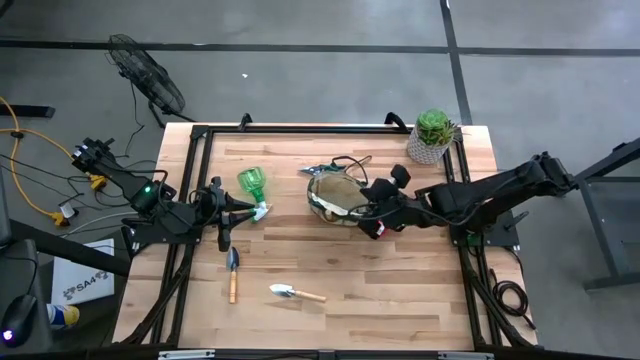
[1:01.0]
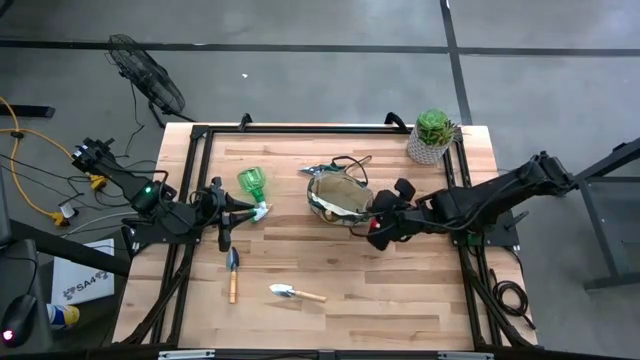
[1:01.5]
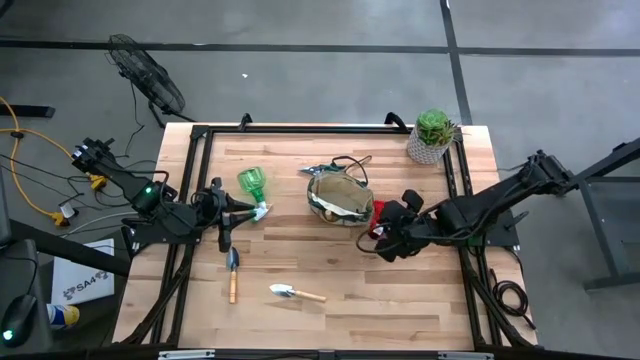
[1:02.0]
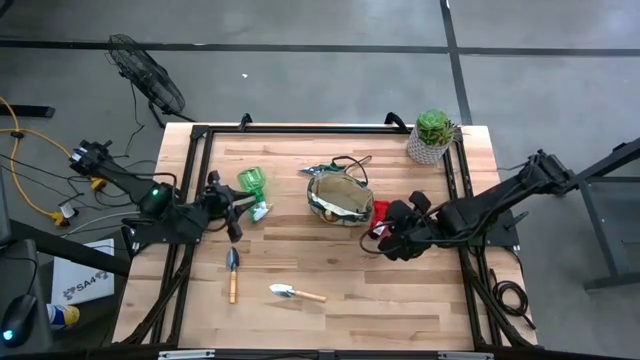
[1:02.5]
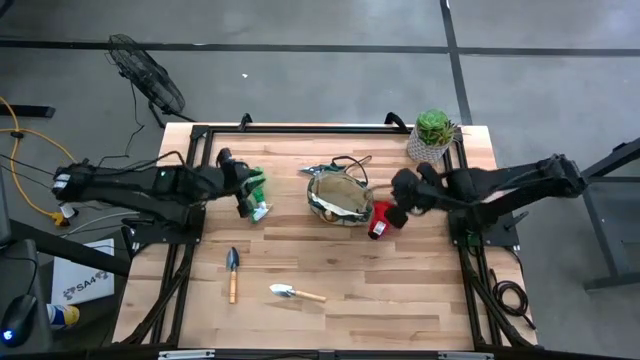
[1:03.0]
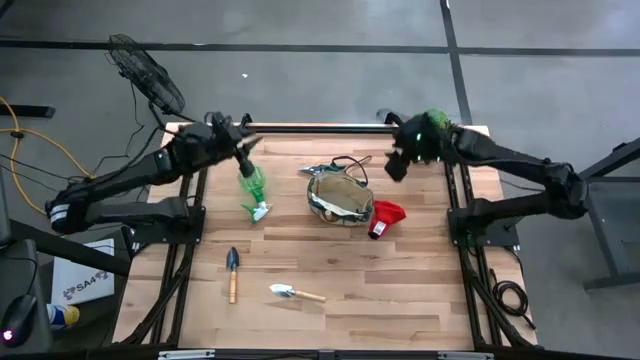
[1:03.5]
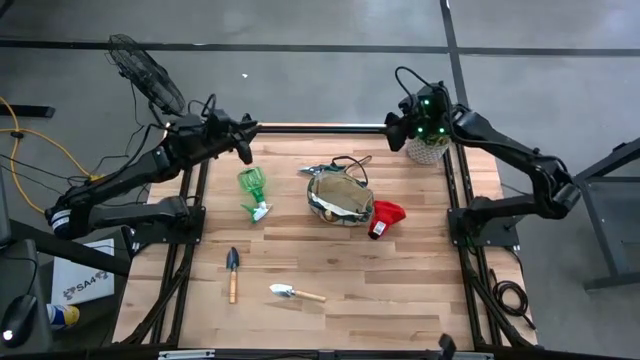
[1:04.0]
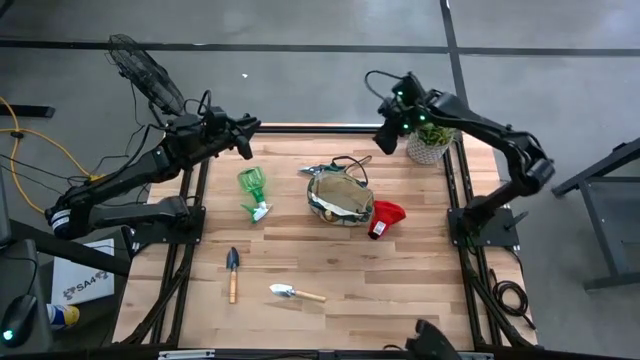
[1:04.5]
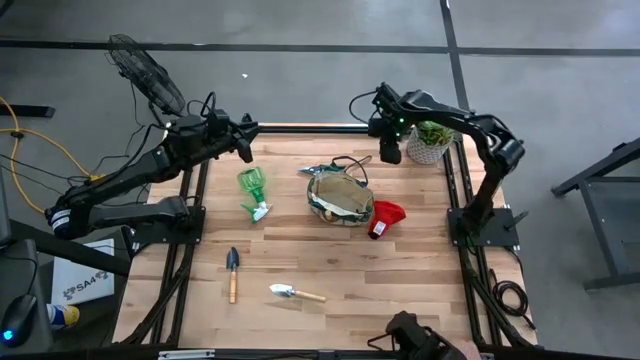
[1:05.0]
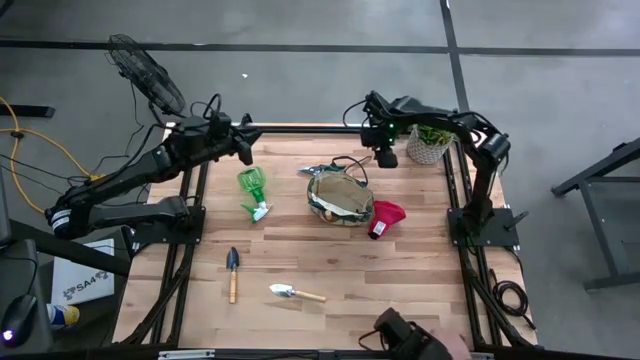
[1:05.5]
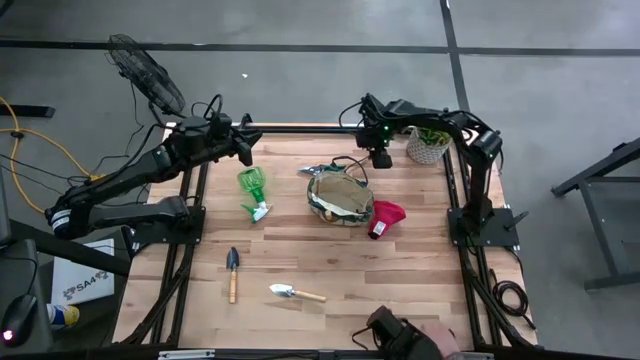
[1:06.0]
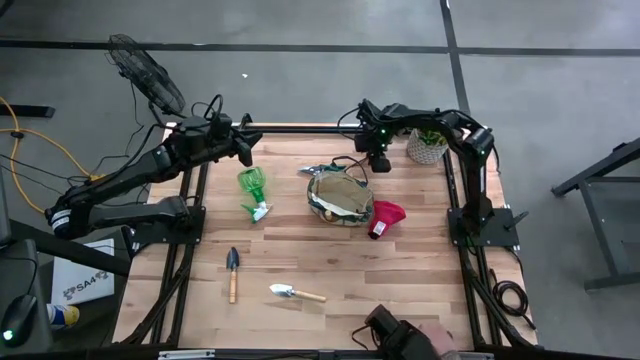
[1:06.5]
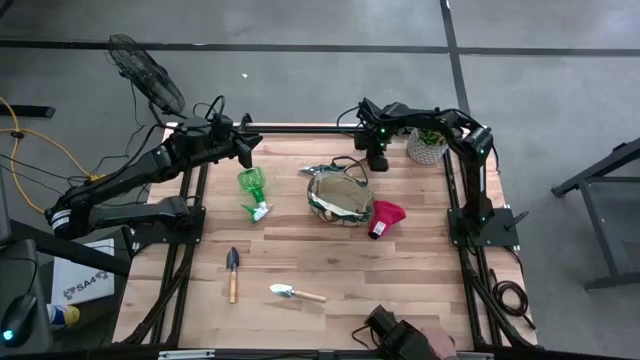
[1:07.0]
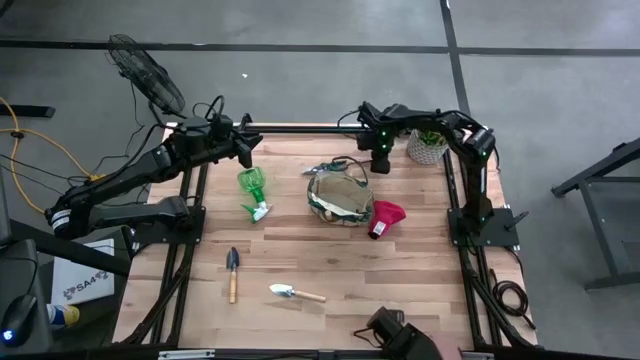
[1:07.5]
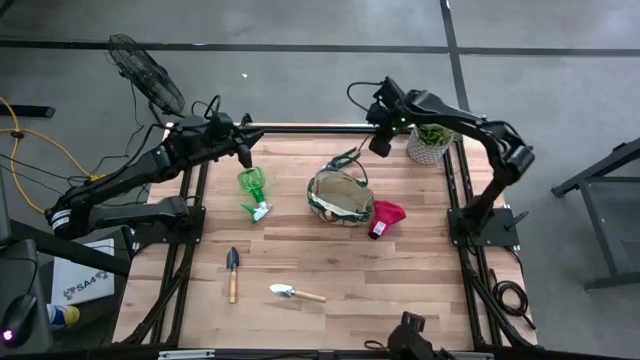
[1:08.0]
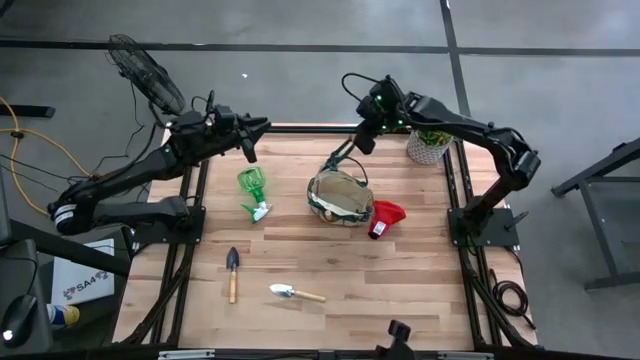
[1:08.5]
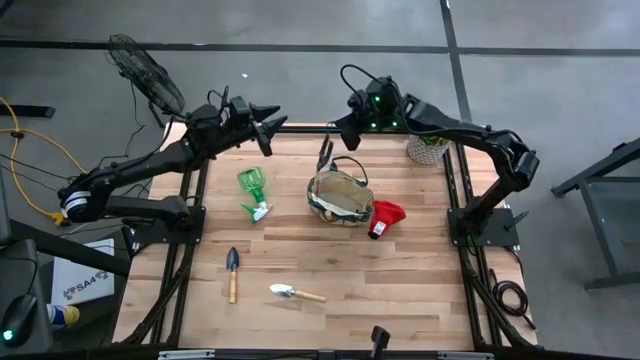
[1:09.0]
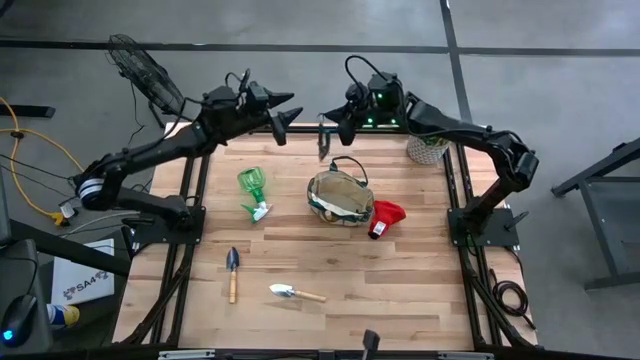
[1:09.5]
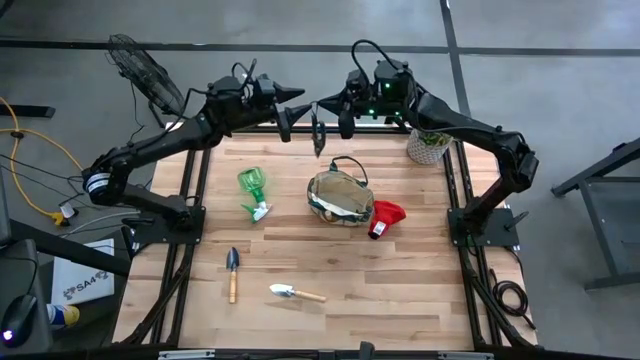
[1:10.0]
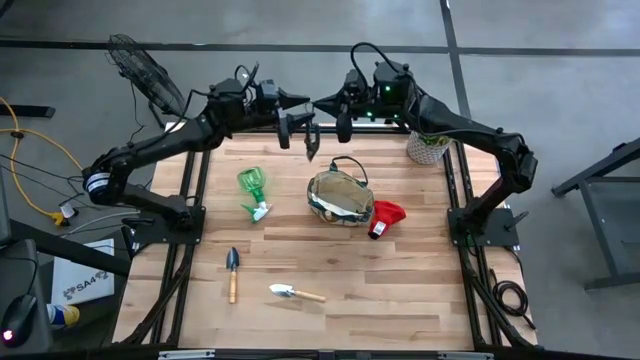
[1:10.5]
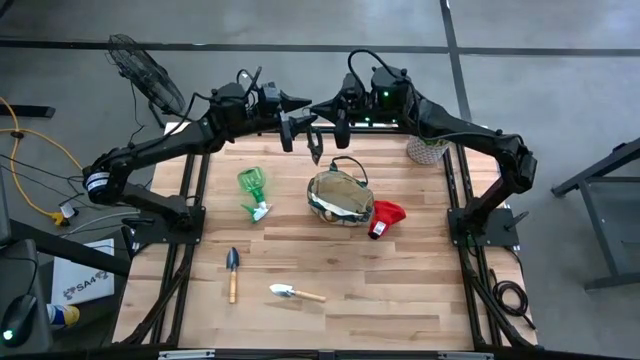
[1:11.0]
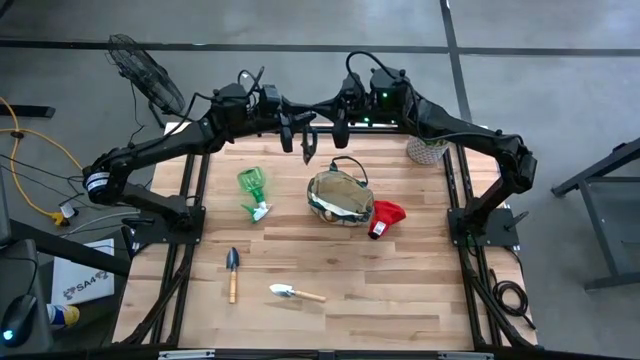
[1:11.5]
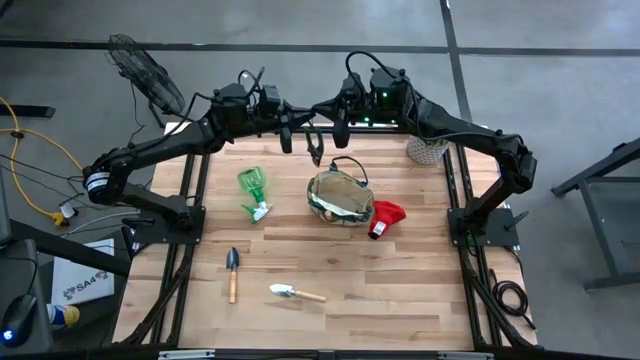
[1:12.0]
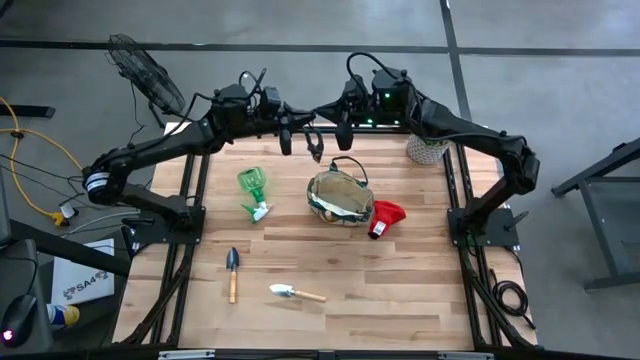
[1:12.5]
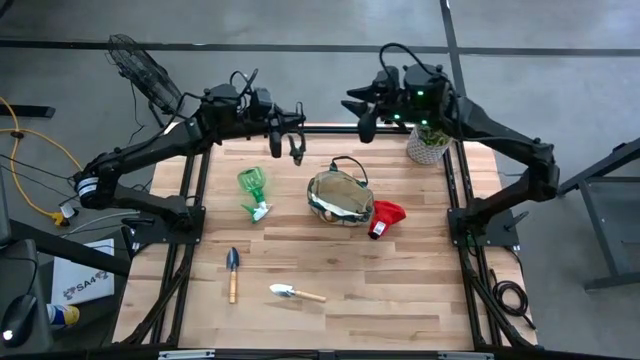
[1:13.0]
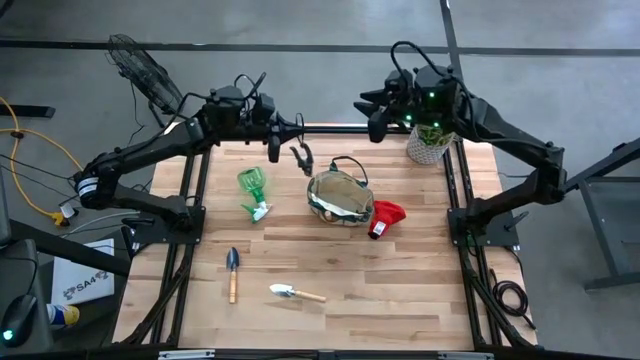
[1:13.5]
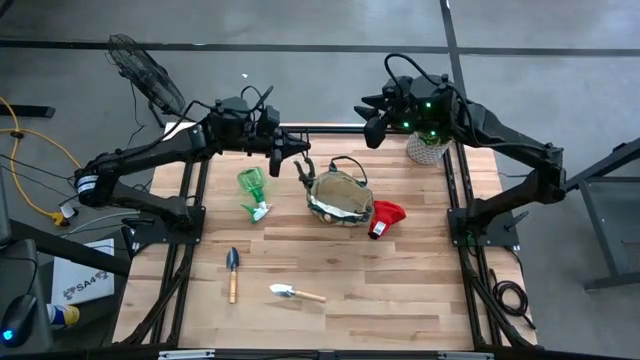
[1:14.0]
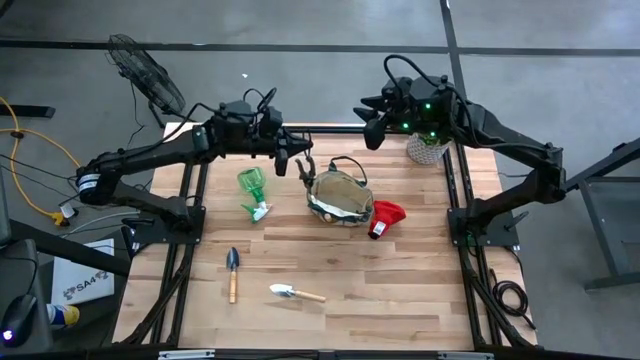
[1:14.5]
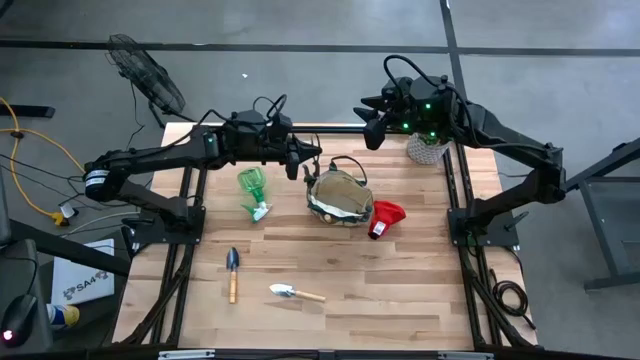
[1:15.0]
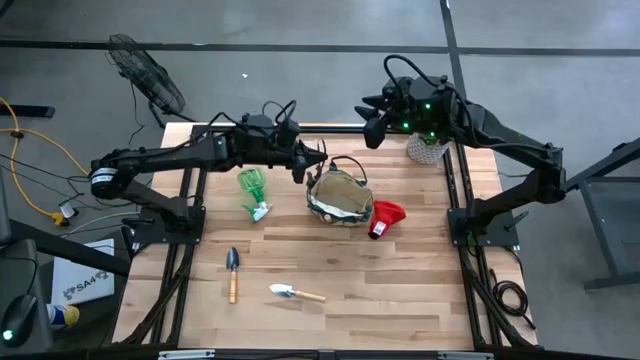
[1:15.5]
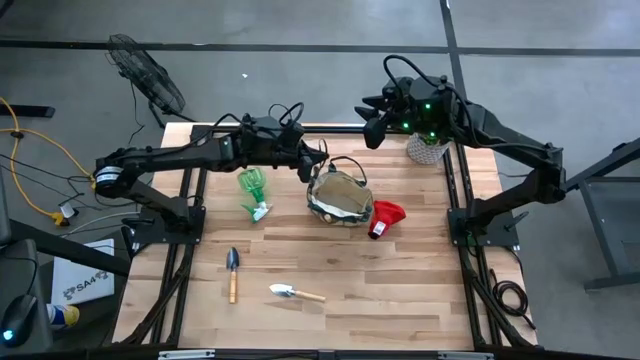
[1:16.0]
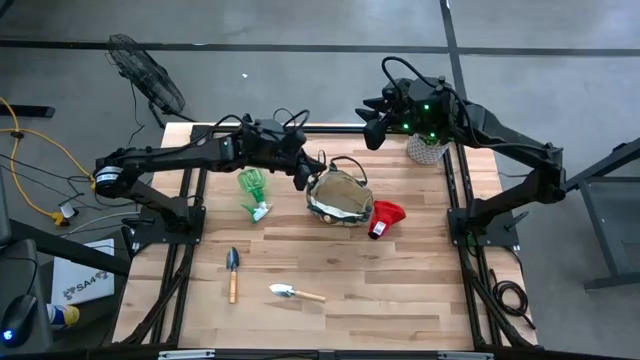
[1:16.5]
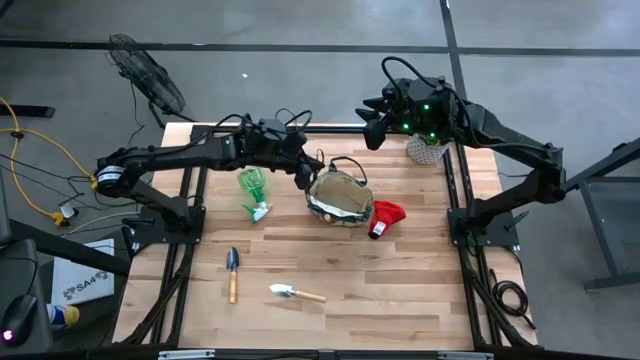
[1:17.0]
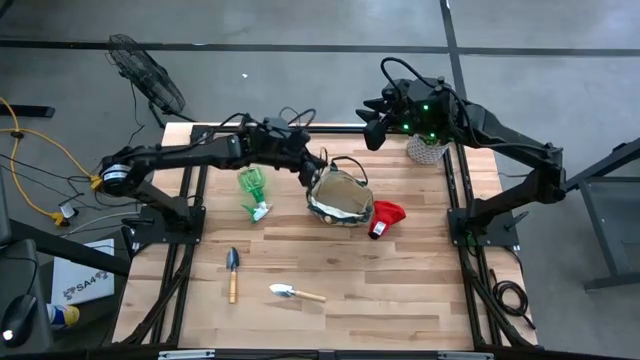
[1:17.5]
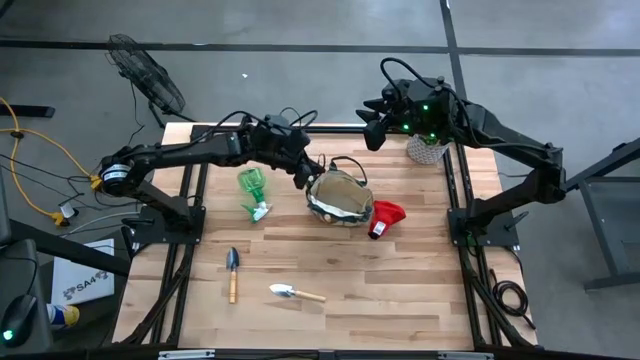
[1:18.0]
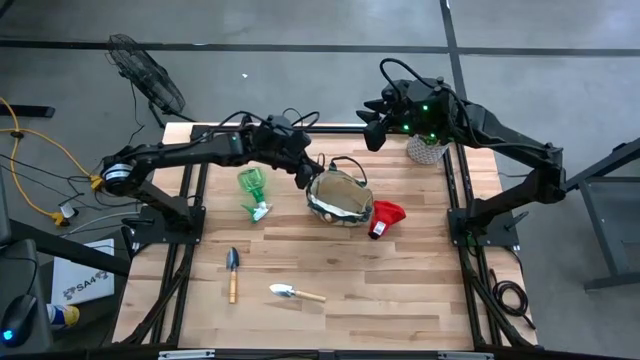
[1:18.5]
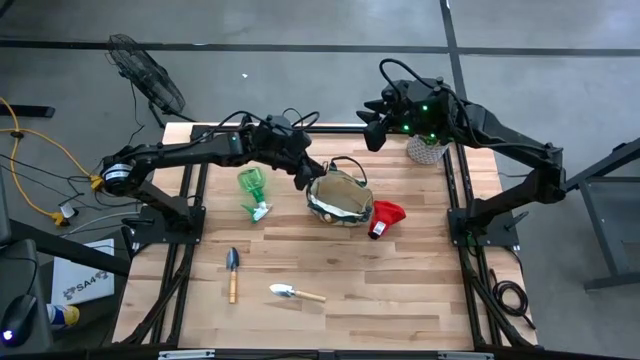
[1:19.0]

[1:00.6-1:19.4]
Task: Pick & Place Garden tools in Gardening bag
Put the green shear scissors into the gardening bag
